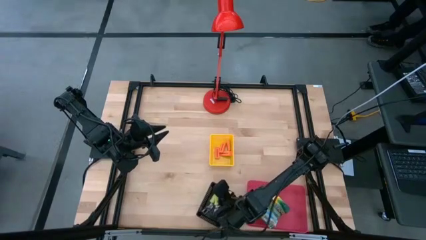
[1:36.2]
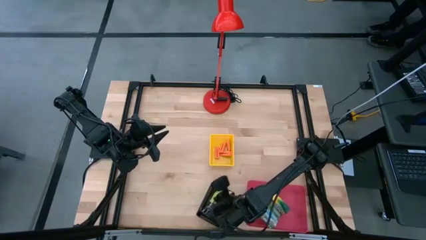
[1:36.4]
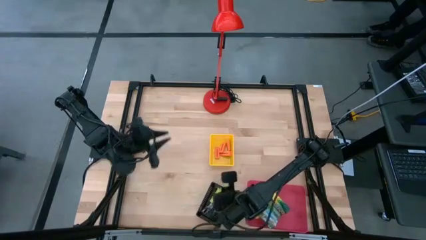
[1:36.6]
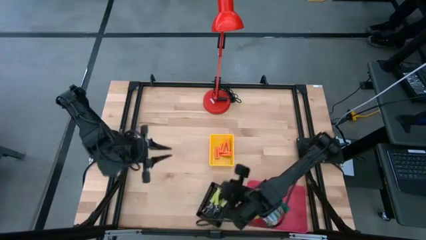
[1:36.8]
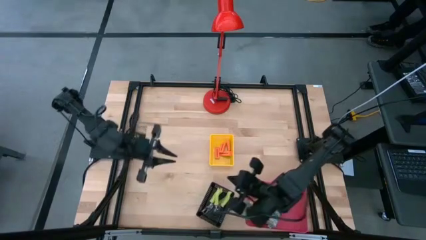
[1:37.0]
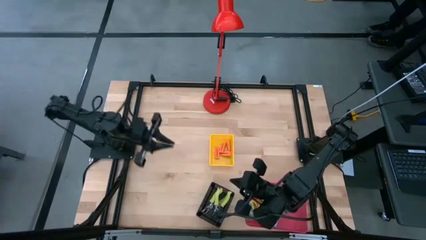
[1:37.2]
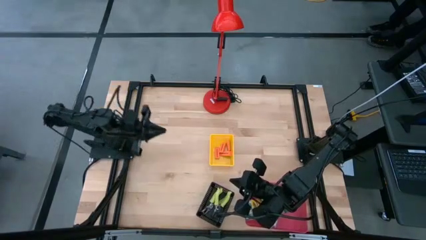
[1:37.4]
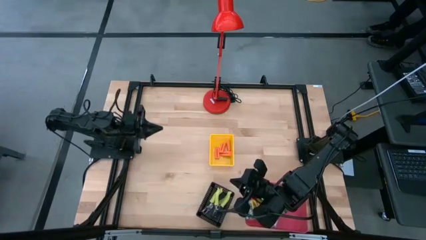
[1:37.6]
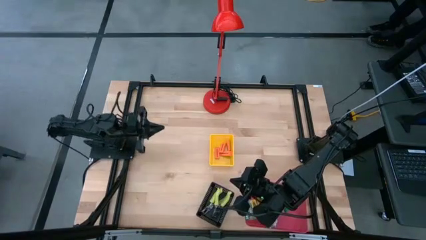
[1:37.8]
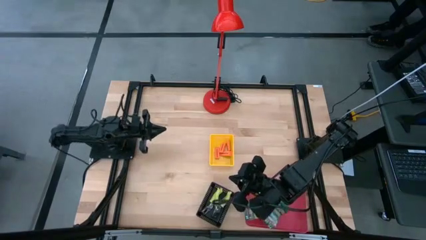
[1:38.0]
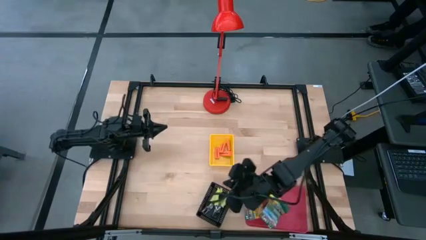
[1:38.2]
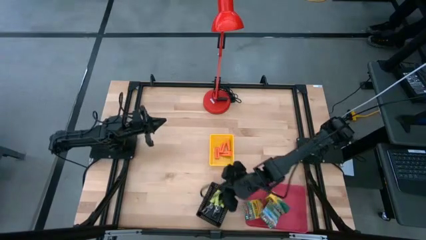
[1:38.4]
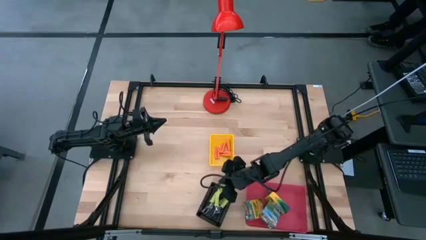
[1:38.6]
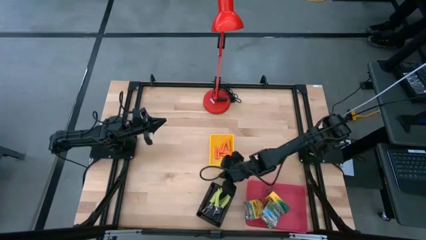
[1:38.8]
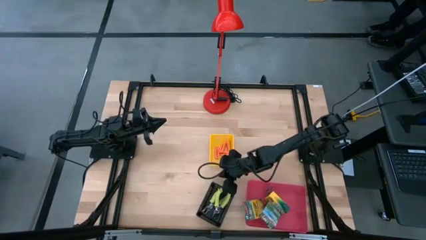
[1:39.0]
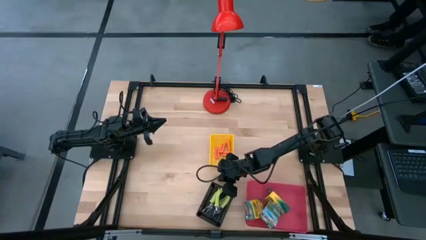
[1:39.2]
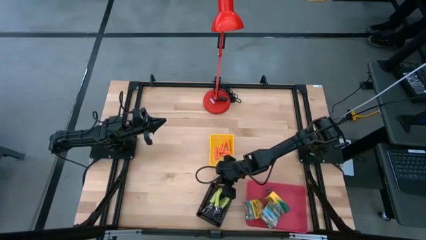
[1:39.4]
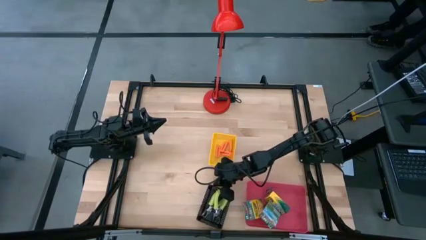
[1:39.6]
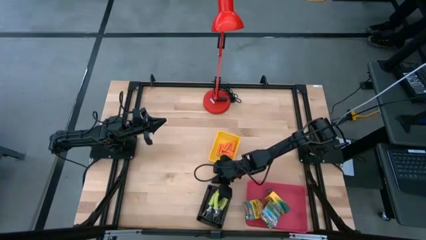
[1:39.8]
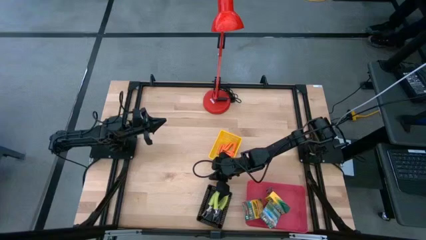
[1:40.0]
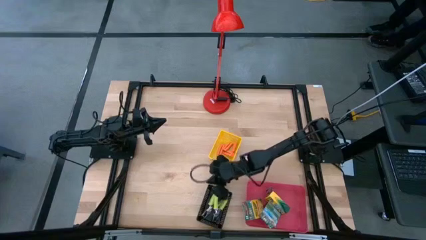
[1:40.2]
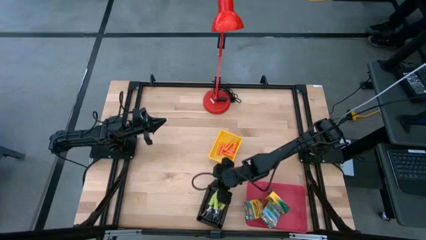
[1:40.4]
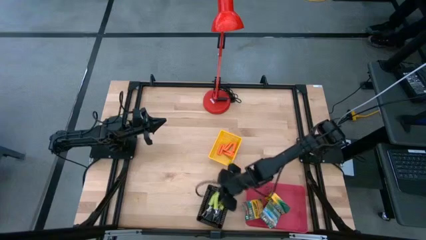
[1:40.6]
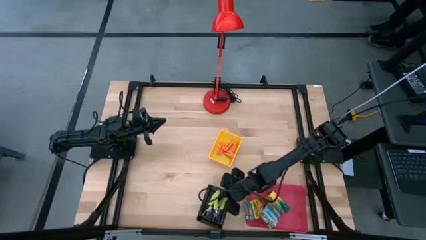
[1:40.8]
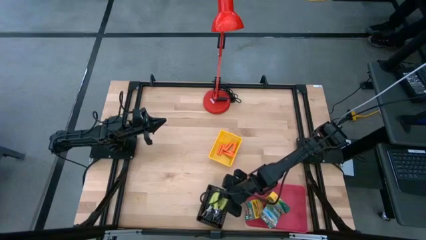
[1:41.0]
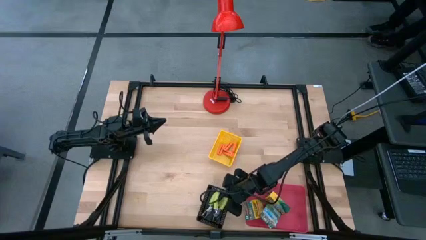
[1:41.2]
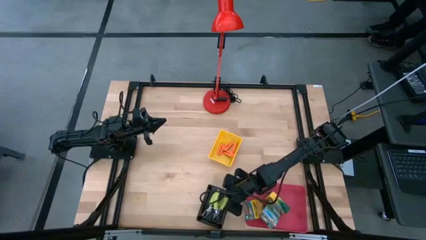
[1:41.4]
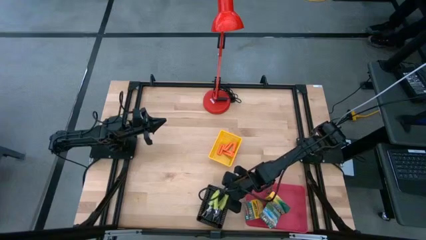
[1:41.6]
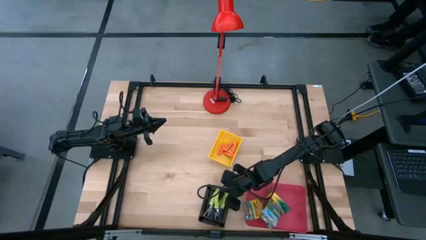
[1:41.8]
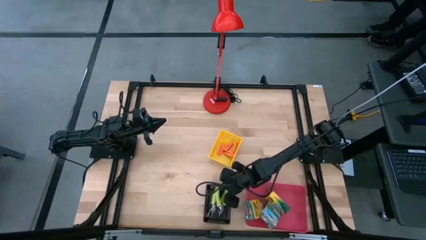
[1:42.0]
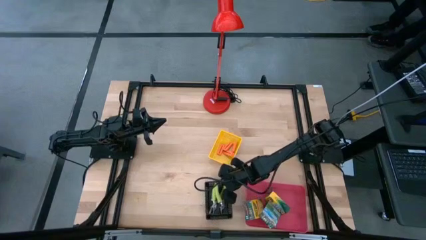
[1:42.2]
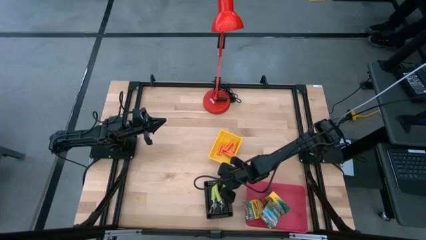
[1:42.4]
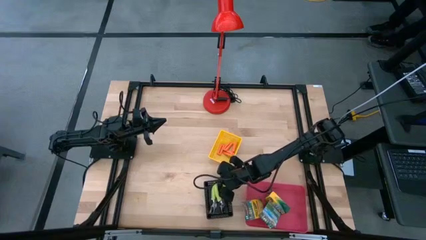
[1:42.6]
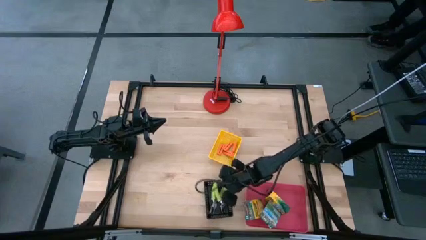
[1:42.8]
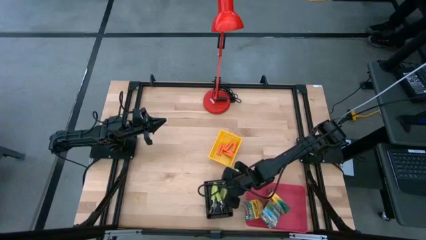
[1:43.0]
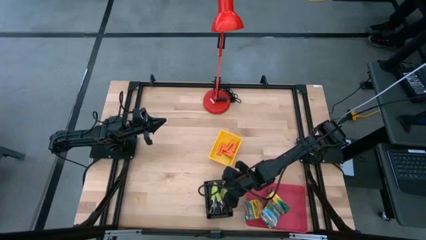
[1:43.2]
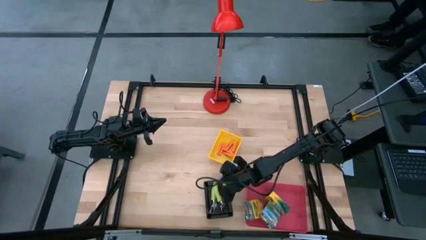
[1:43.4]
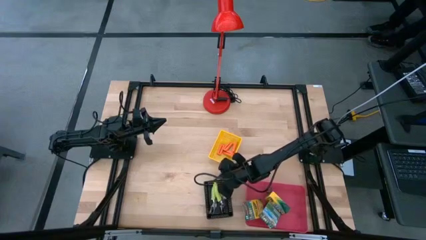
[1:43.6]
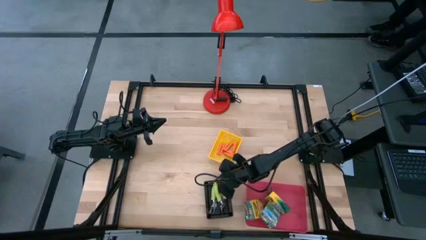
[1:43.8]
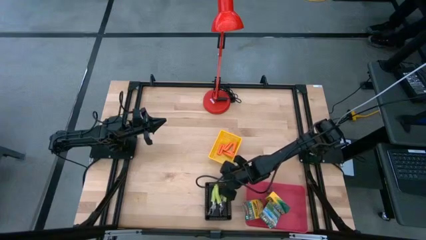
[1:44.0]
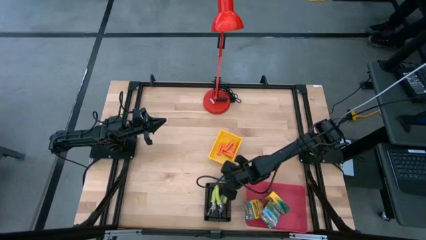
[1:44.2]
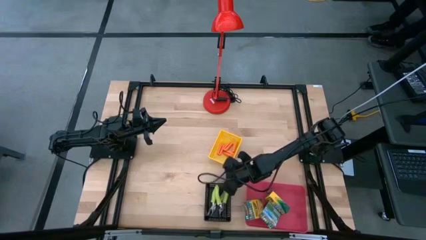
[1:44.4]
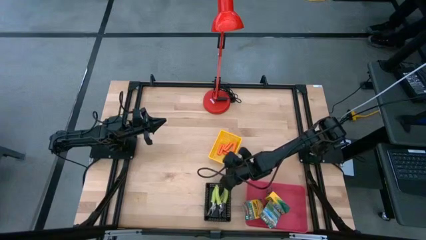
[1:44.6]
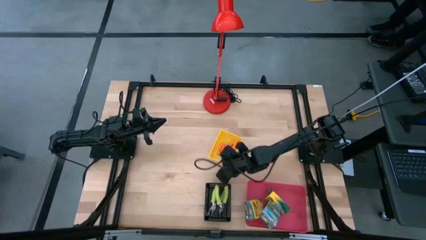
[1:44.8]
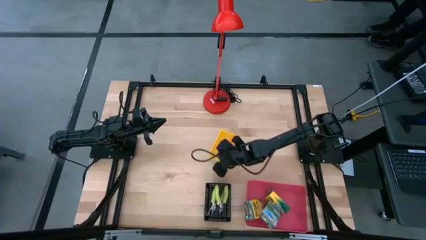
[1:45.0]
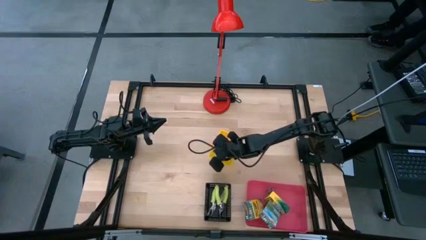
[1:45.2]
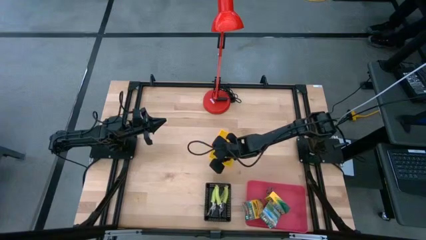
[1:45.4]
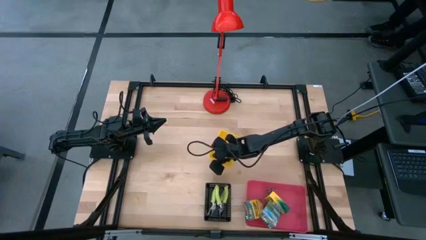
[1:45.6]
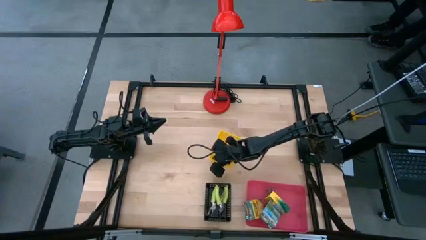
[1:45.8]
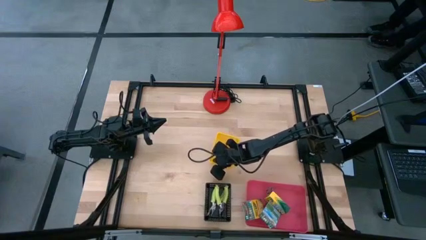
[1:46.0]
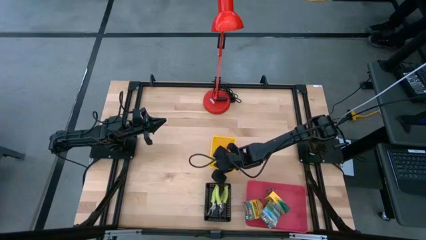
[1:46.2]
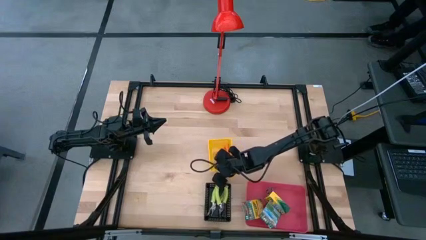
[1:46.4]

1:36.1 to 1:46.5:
Task: Pick & Place School Supplies
Adjust the bins

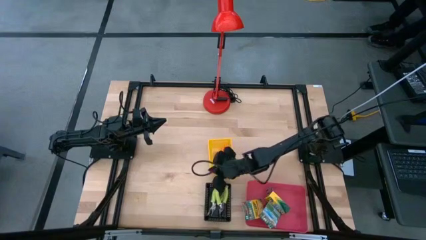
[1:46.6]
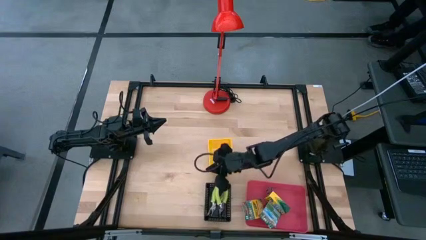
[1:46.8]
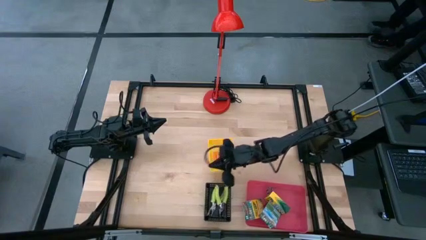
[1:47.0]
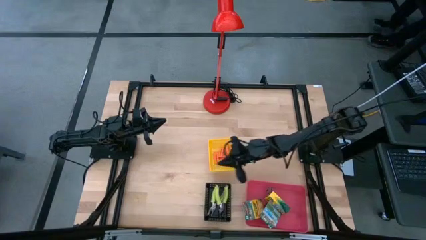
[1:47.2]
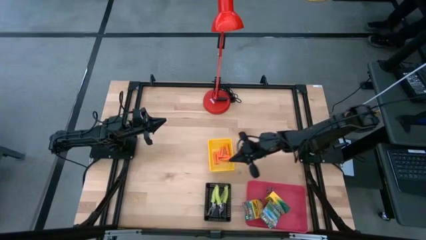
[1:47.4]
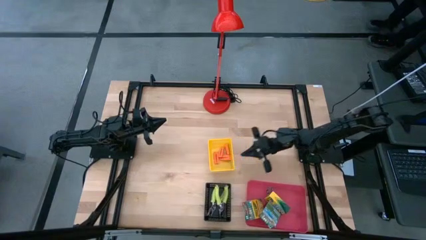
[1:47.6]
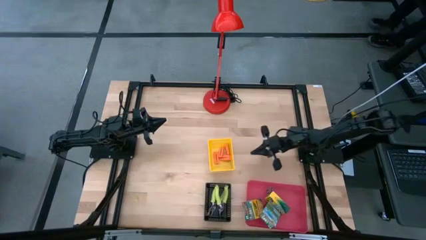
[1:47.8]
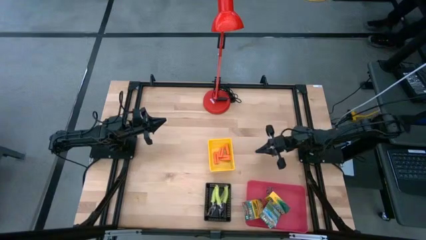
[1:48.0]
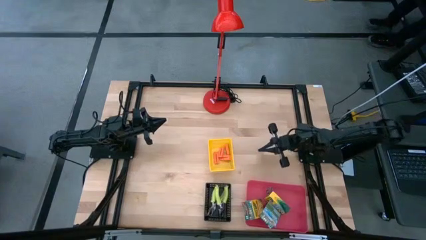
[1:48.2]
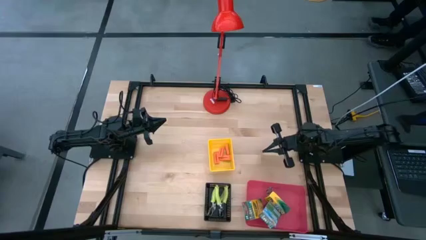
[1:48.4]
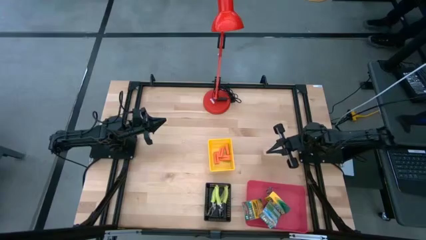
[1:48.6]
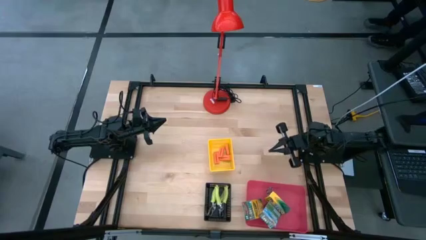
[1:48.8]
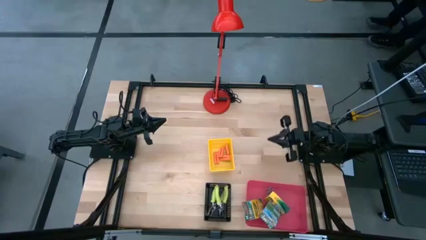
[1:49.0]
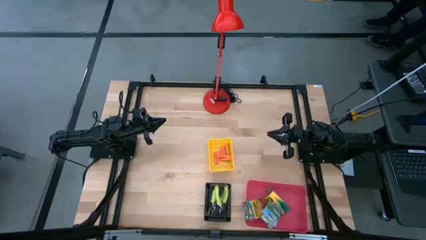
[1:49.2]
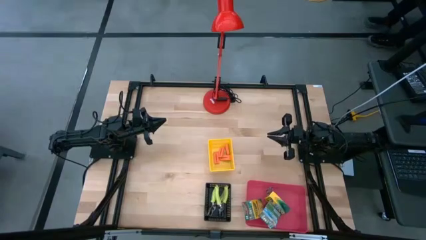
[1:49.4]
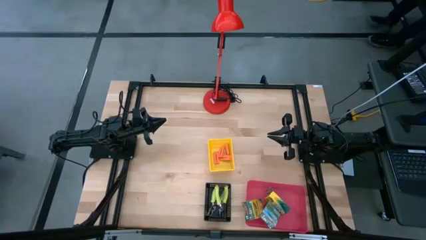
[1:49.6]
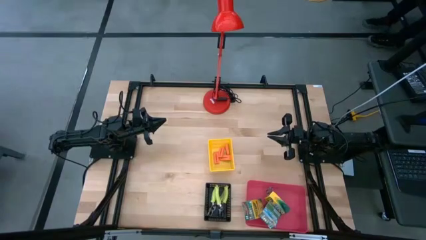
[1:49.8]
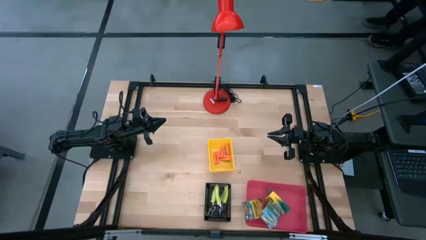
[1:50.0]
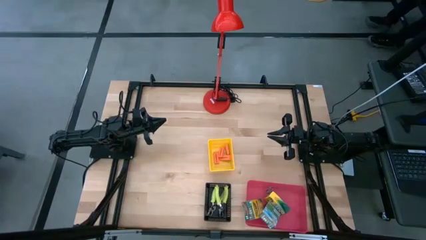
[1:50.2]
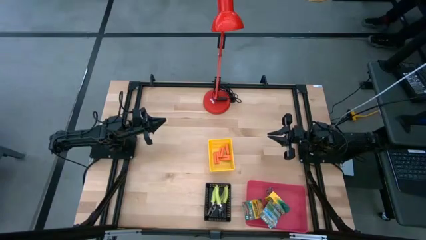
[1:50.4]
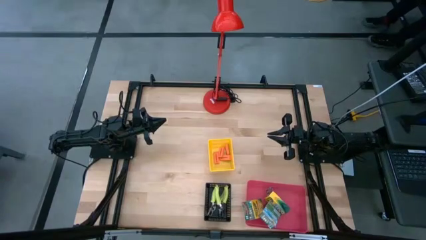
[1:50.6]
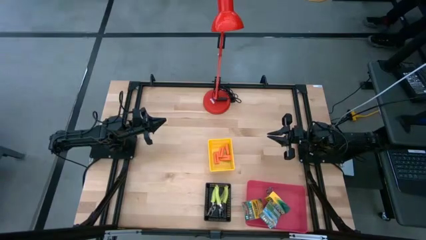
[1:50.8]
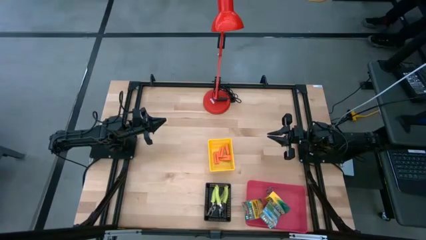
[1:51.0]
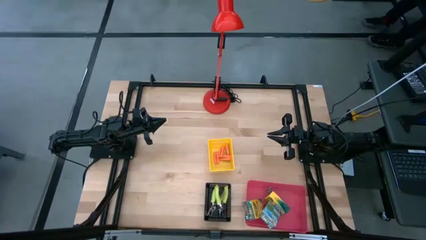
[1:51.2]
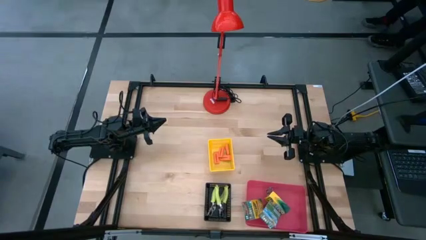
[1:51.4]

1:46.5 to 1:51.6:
Return to Home Position
